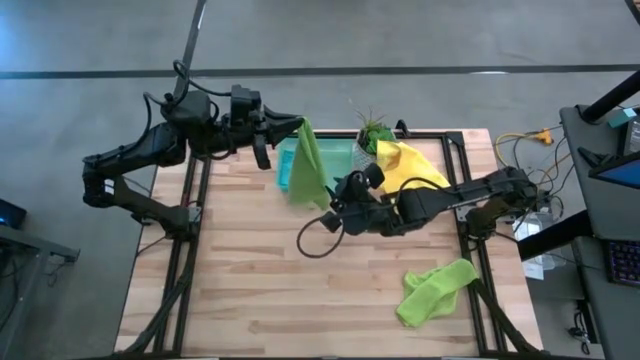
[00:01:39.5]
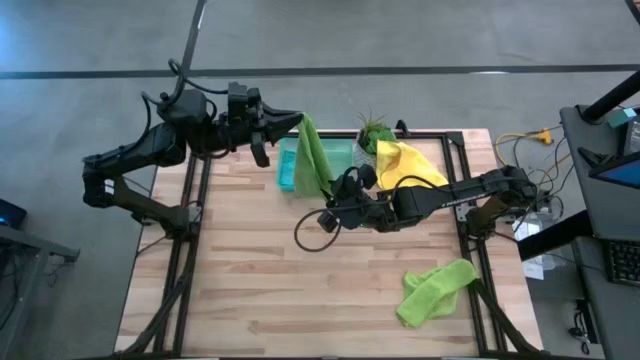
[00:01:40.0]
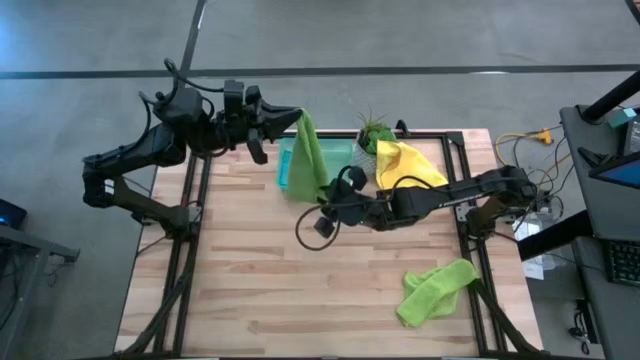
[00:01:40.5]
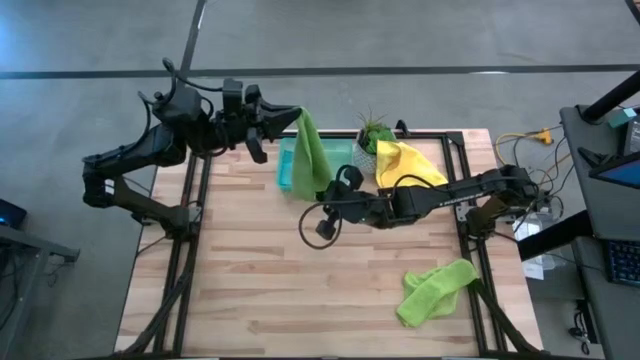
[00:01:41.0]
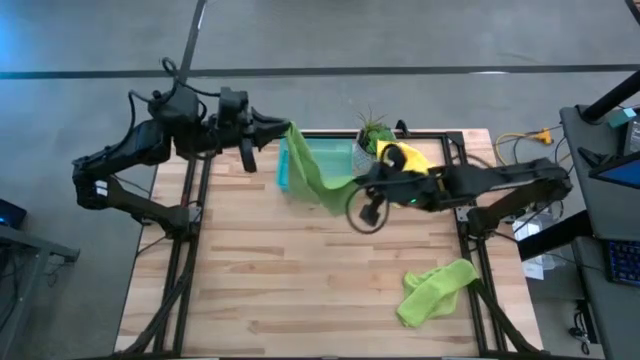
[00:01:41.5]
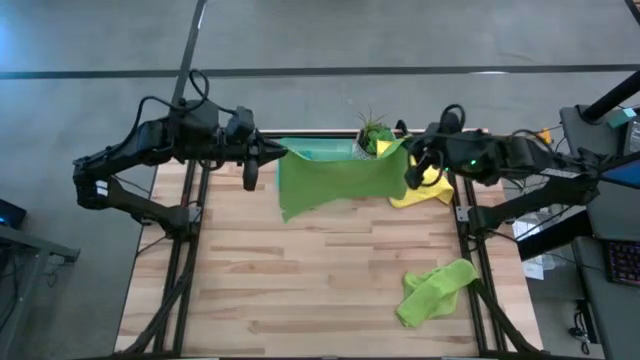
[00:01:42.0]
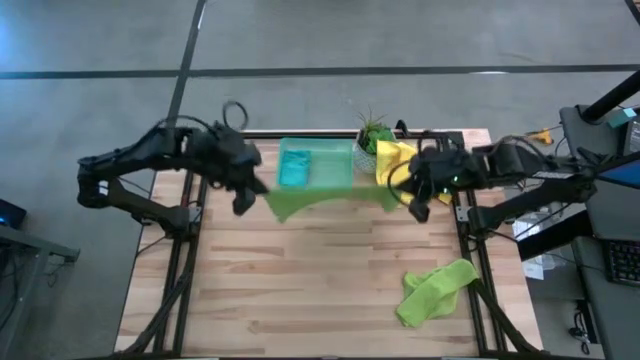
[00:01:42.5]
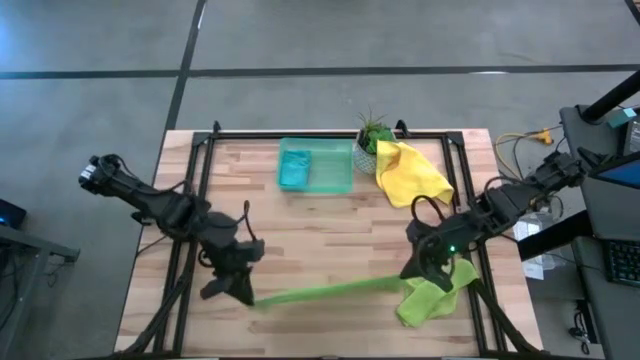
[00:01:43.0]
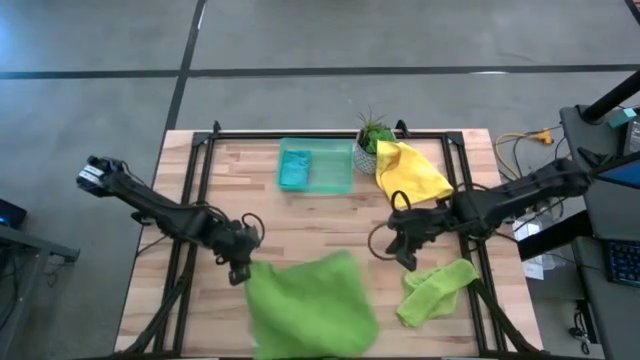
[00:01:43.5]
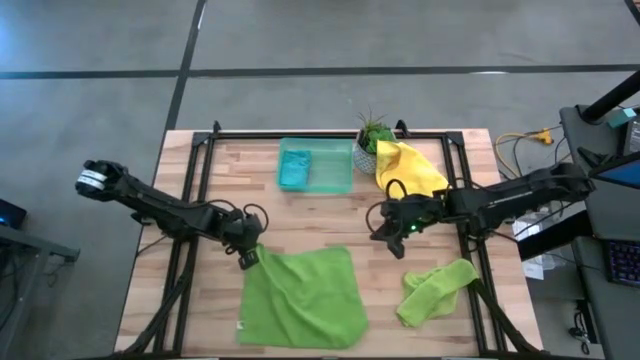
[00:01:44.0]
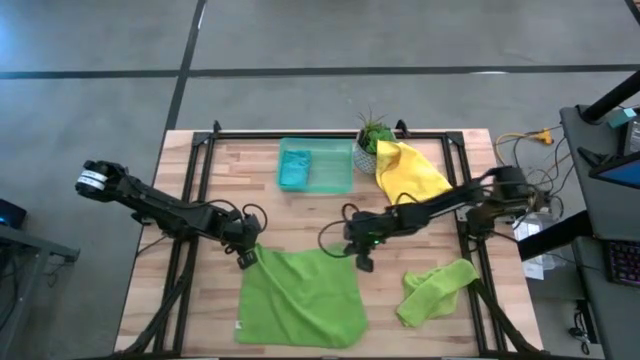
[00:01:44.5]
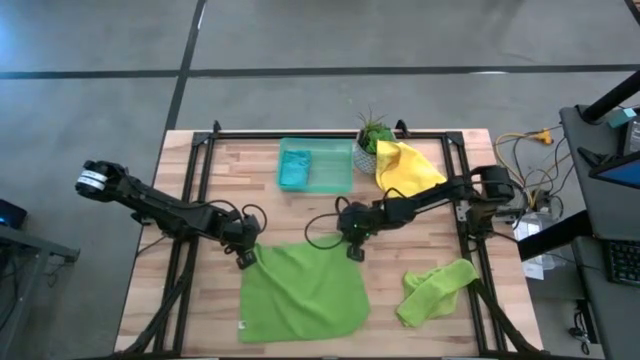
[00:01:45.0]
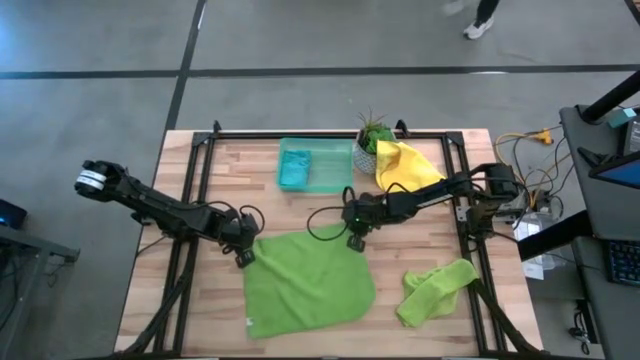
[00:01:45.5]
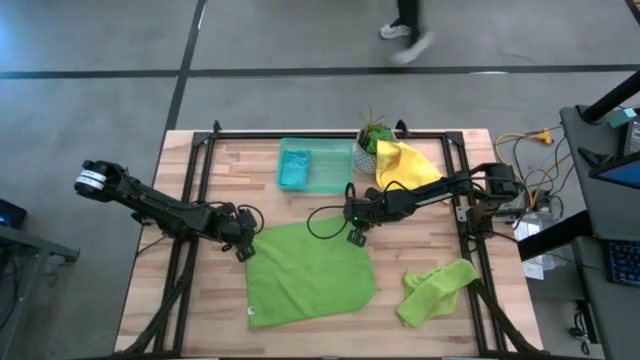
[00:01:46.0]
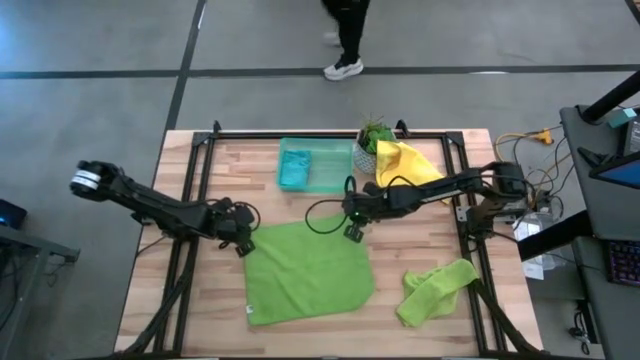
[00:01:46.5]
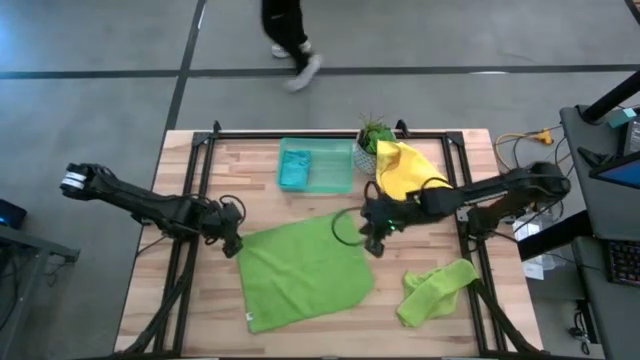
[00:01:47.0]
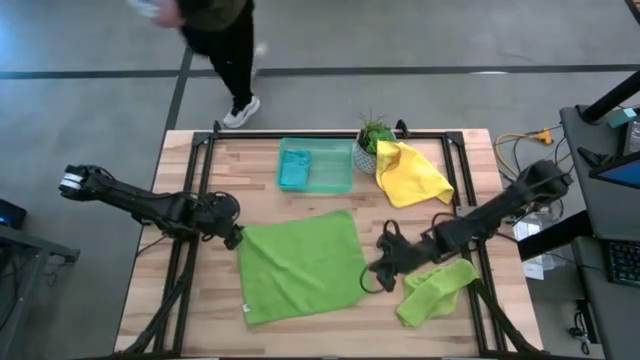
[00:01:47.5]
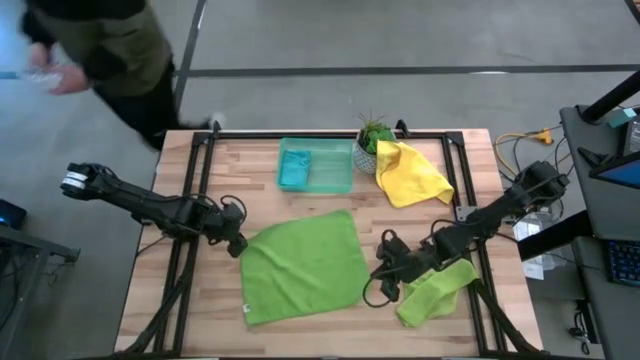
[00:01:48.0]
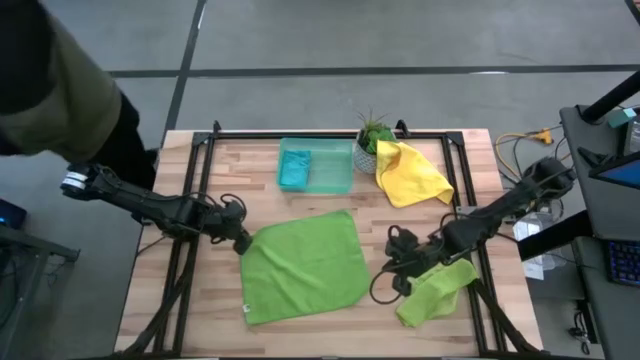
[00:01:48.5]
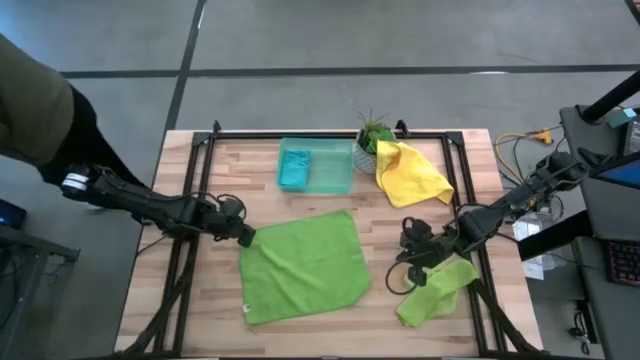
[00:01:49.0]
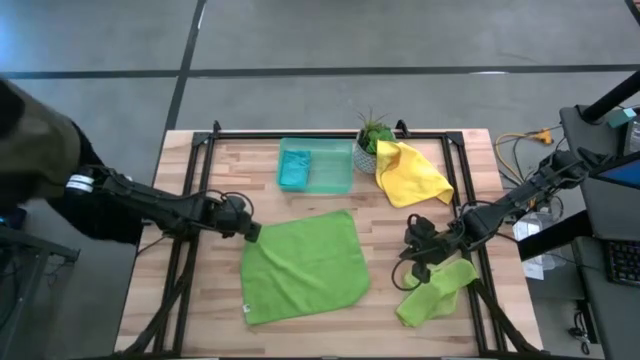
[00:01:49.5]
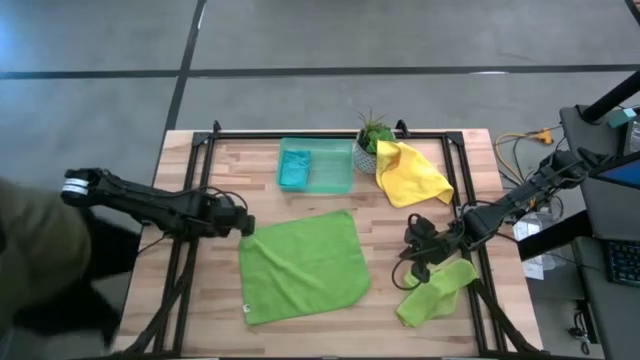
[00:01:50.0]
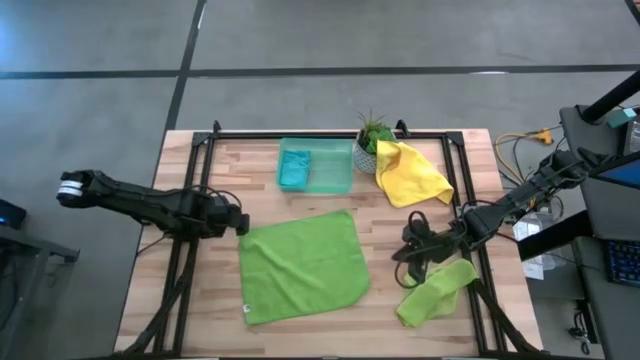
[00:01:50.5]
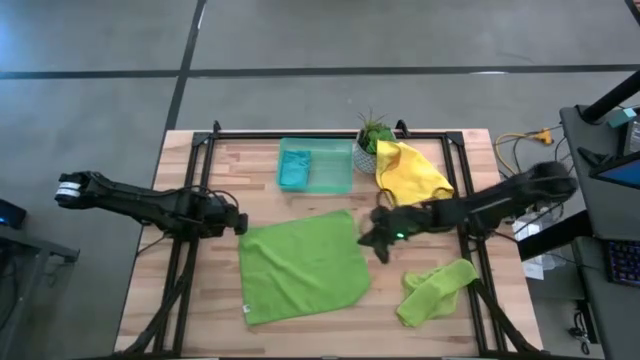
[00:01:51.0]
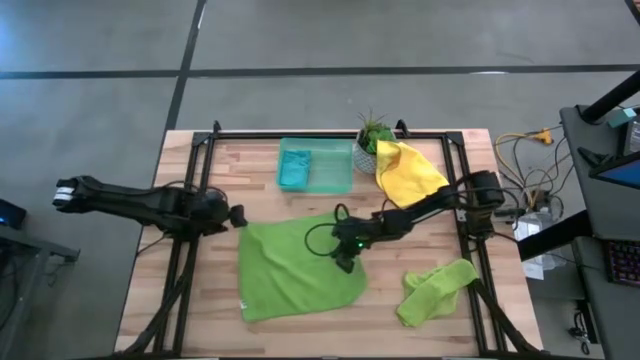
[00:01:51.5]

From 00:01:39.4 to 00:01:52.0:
Task: Fold microfiber towels
Fold the green microfiber towel
